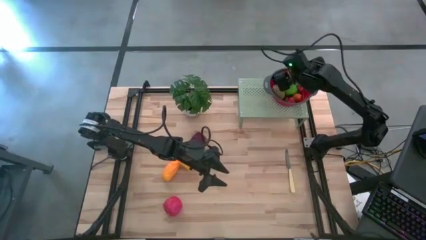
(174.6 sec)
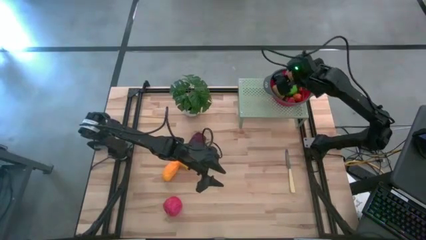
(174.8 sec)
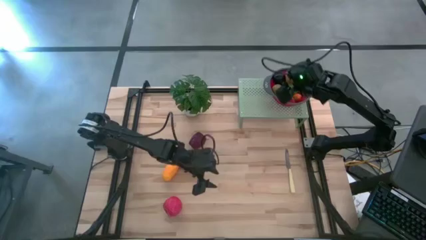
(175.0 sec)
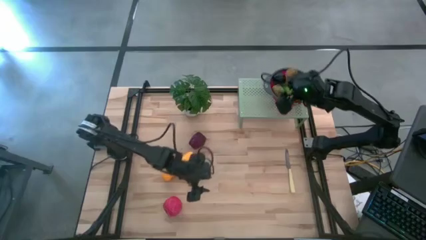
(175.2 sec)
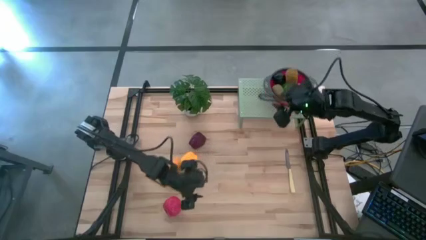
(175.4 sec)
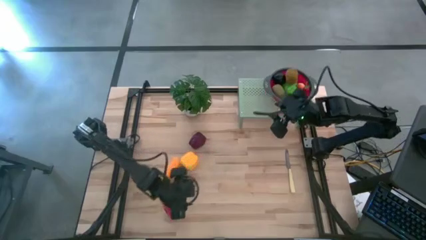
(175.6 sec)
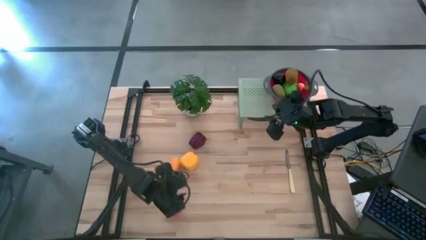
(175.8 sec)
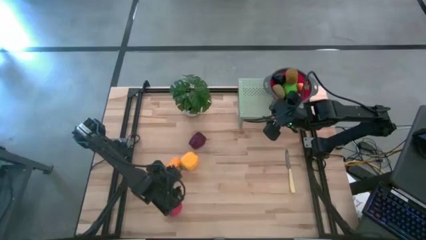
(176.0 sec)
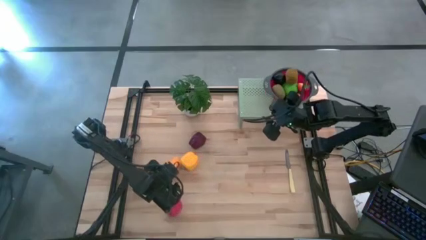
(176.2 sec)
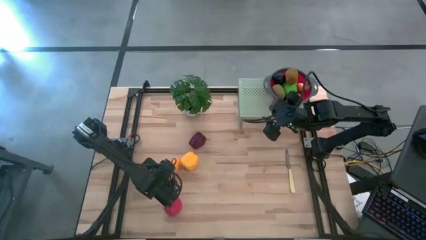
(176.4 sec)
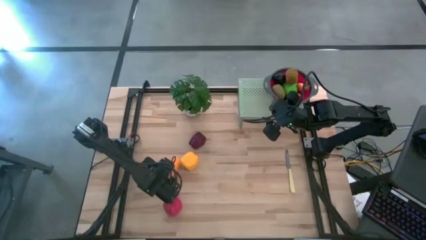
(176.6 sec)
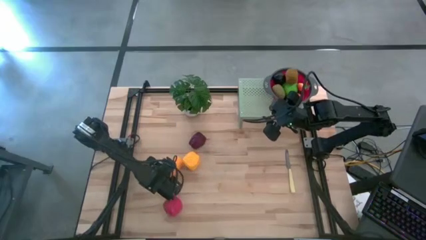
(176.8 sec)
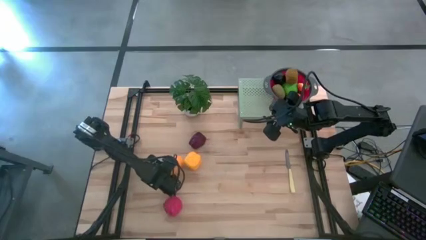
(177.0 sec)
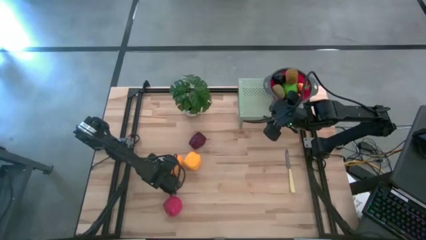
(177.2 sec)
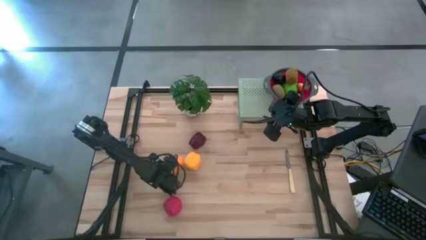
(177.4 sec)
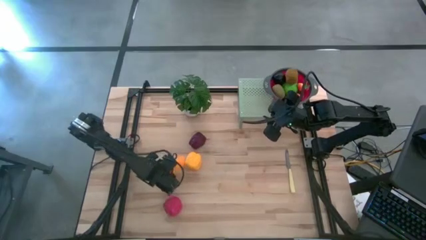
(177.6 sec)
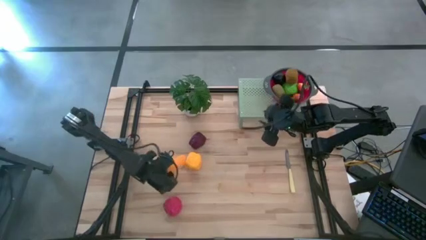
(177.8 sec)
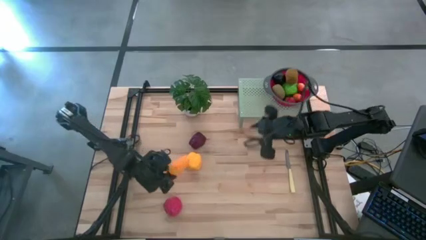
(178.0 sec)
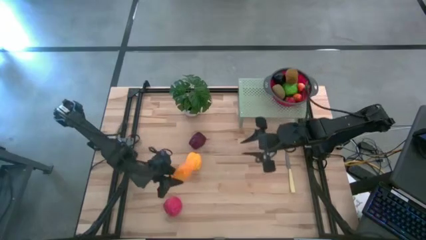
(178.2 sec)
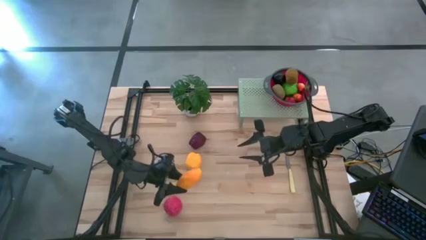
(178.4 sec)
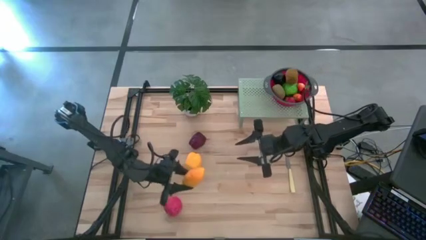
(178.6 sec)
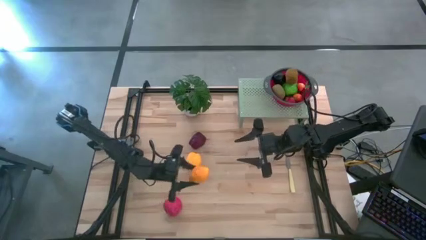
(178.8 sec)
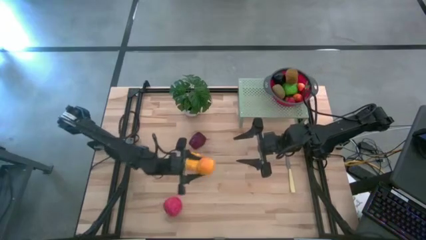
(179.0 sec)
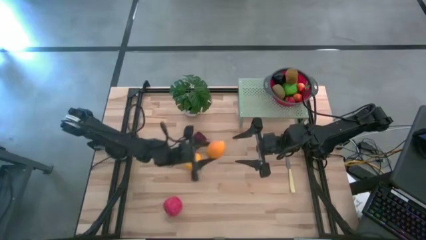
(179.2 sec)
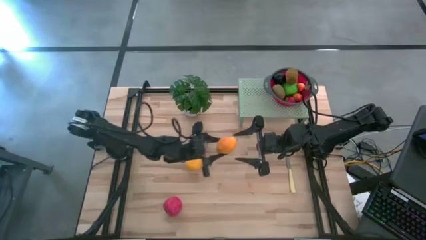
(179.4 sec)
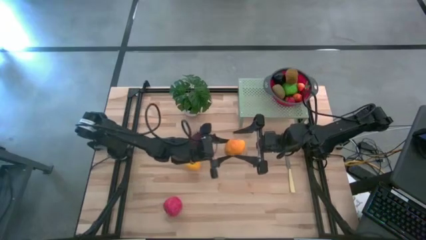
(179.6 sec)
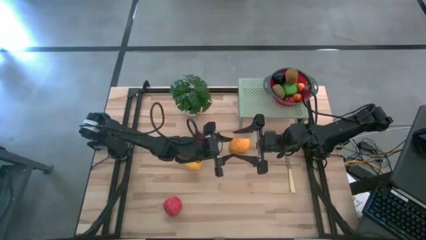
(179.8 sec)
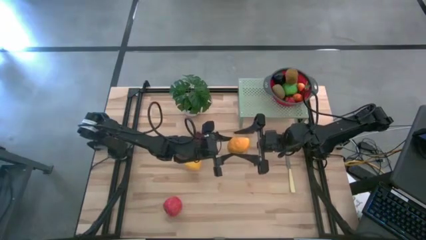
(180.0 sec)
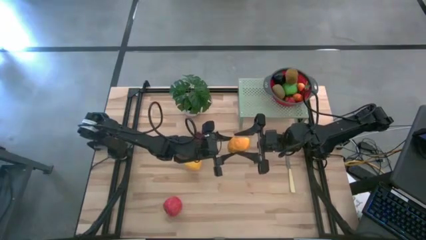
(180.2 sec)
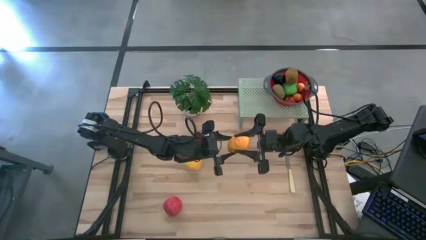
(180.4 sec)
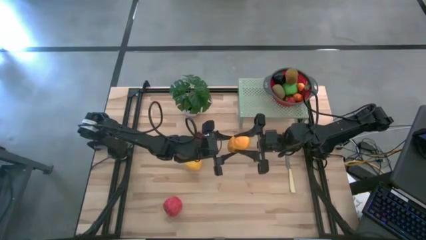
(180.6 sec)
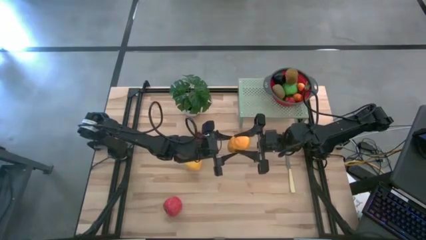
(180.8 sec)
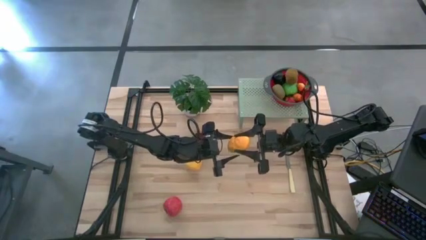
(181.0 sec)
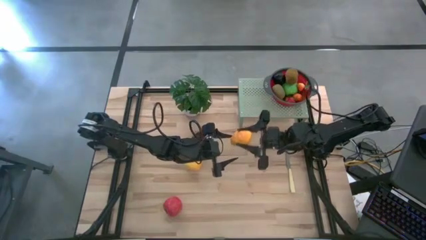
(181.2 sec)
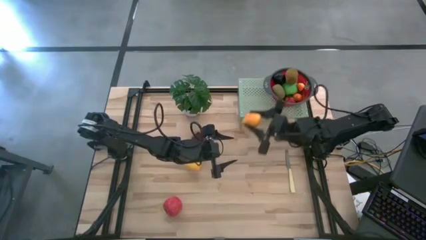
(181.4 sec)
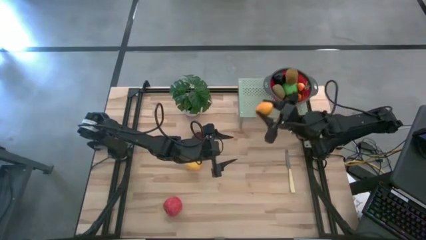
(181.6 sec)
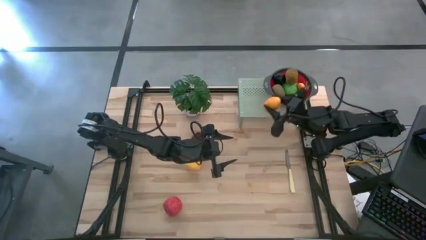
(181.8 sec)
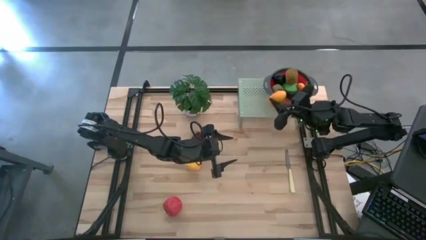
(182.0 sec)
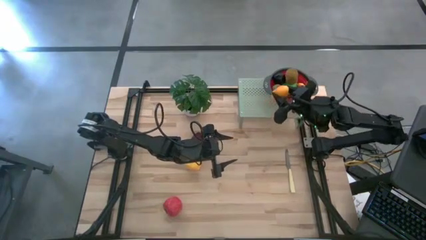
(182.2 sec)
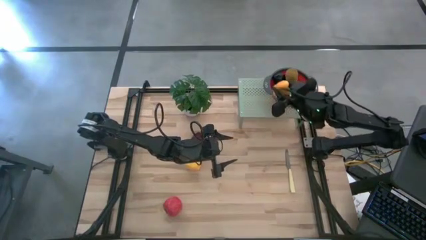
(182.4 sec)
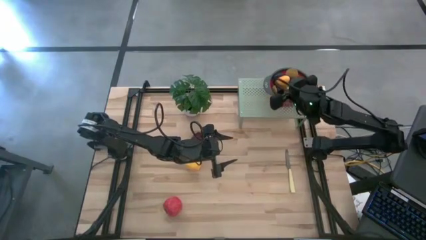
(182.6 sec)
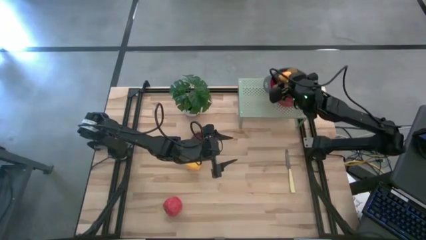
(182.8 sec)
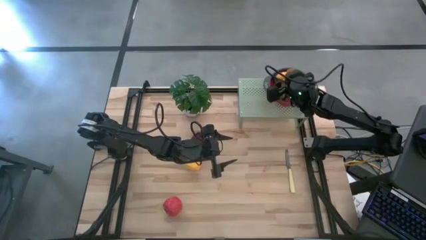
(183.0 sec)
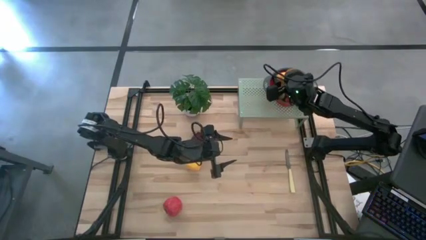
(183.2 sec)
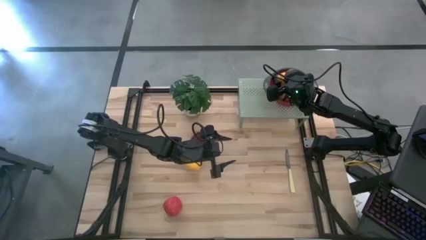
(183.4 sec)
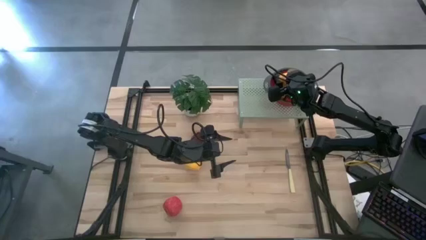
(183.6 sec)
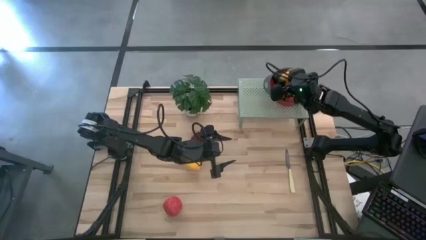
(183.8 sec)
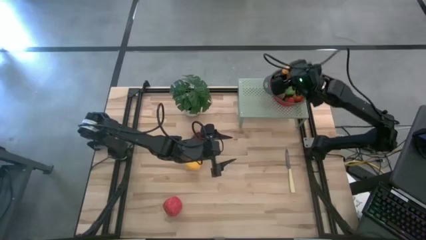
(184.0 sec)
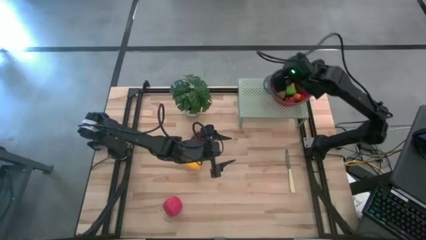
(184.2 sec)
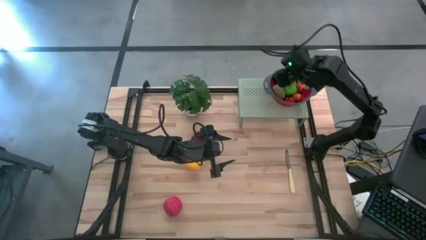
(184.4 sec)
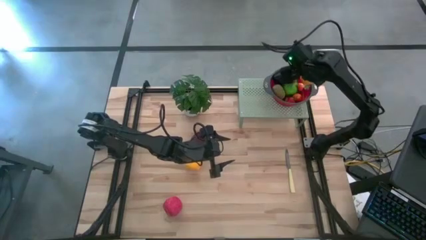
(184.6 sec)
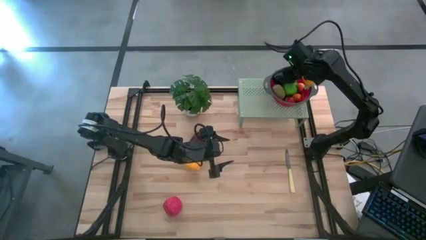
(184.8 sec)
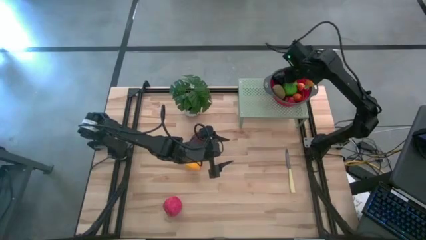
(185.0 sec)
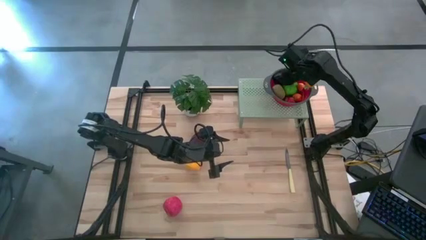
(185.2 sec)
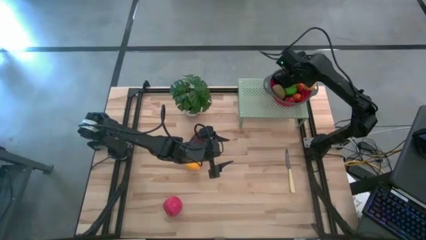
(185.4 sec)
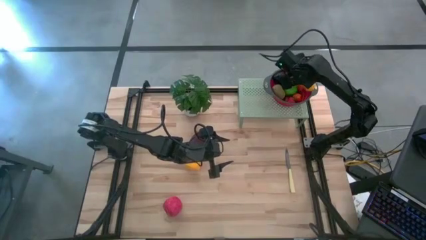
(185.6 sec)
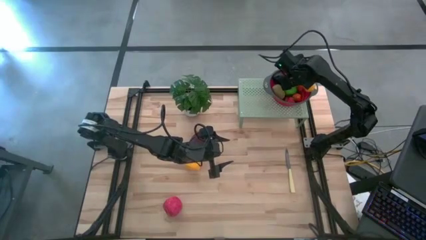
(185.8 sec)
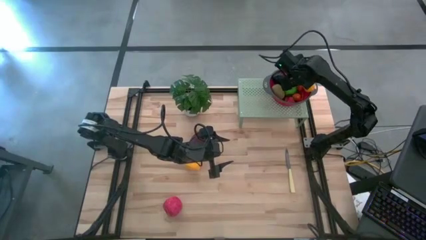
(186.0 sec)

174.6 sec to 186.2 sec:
Task: Pick & Place Fruit
Put the yellow mango into the red strainer bowl on the shelf

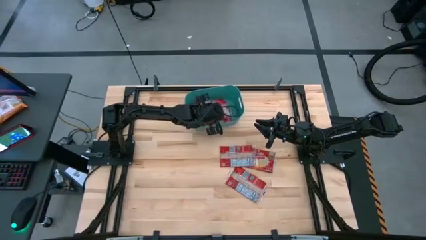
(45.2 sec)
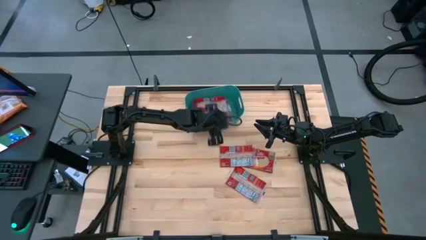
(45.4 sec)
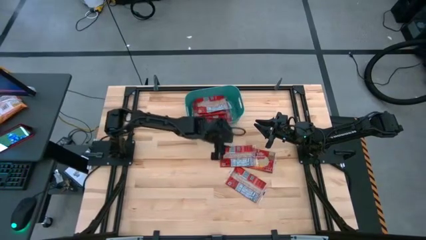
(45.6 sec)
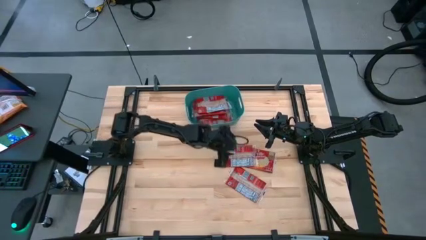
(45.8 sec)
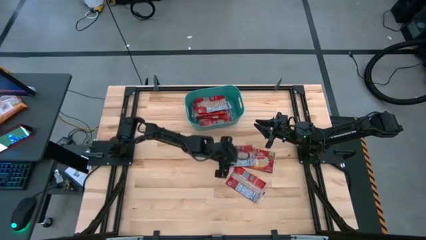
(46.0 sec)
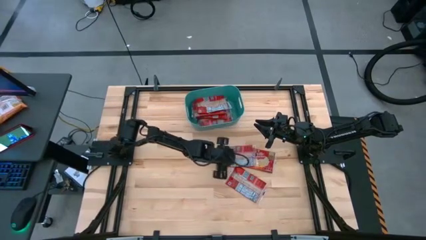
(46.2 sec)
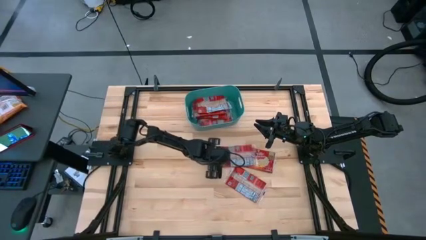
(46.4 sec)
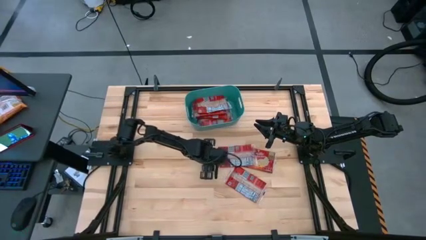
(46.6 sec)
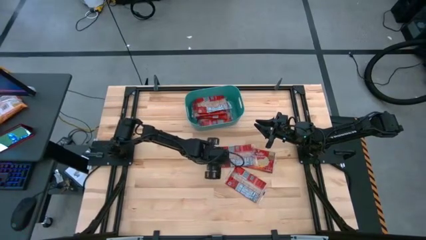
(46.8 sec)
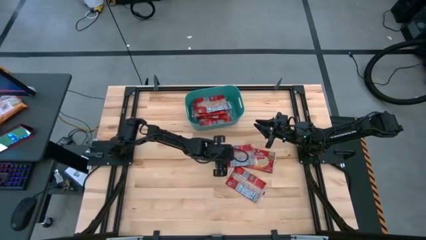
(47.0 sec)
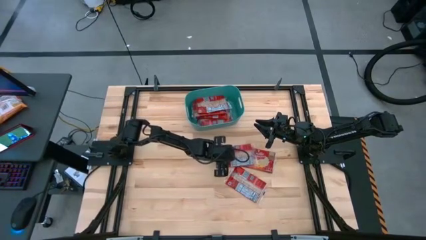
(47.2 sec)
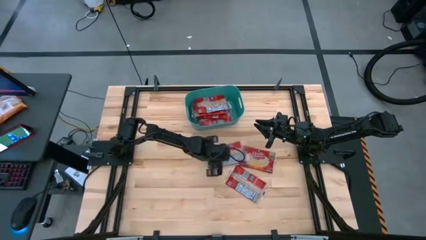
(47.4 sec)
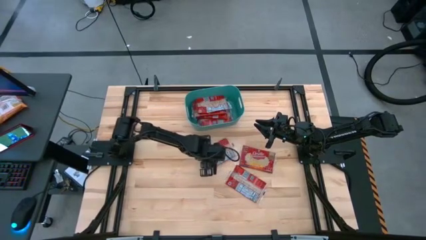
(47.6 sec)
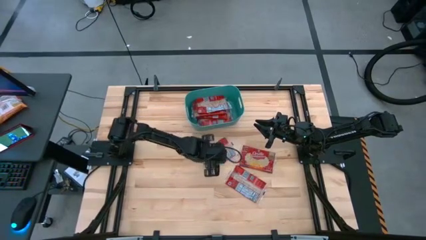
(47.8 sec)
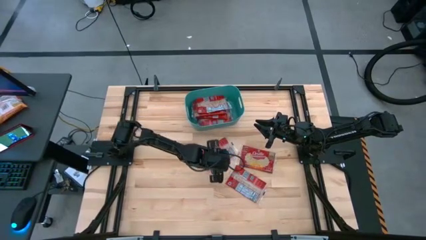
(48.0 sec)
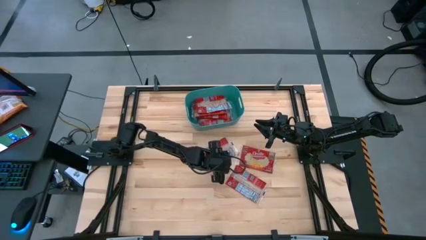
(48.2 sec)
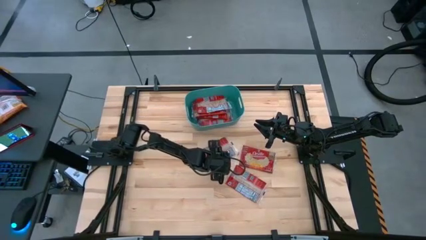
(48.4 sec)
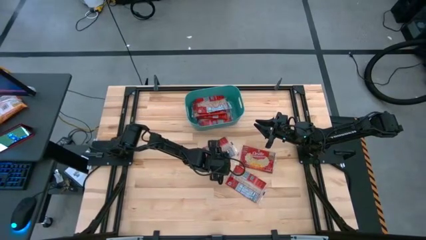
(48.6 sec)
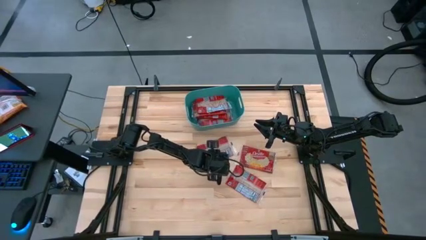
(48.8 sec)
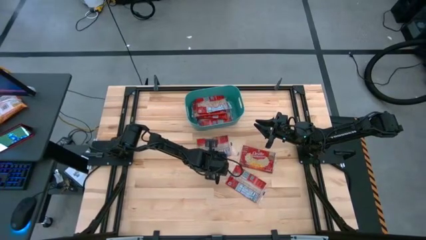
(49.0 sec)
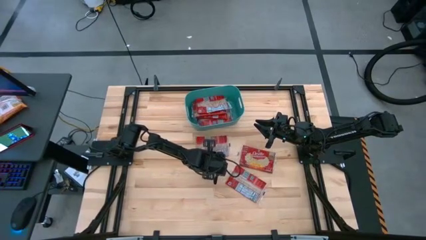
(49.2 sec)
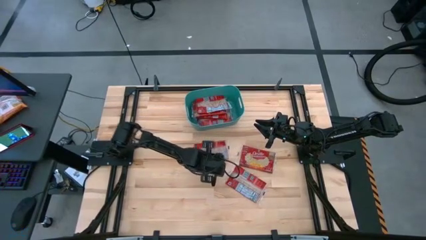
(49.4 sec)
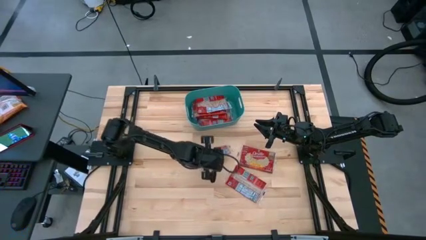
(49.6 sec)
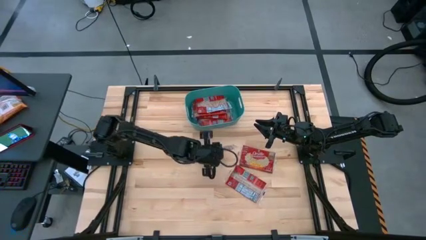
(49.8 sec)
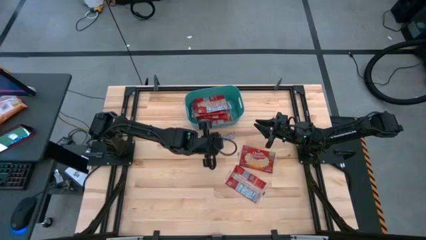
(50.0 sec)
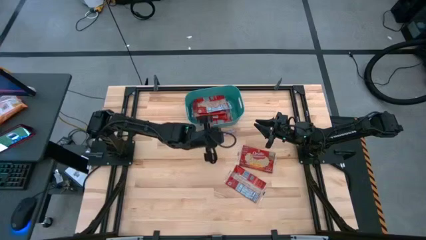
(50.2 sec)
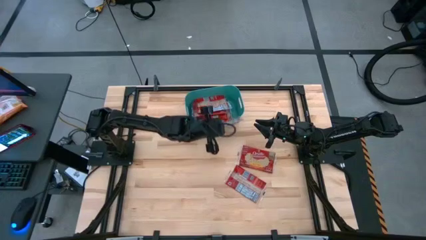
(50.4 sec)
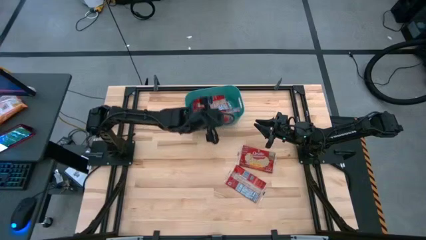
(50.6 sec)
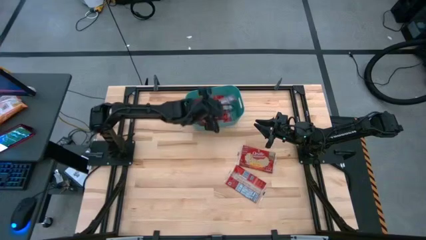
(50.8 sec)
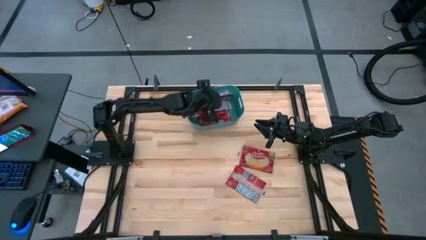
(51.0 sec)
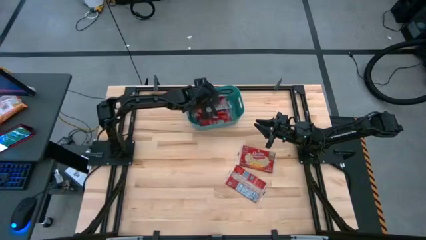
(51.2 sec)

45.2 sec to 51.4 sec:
Task: Sort popcorn bags into baskets
Put the top left red popcorn bag into the blue bin
